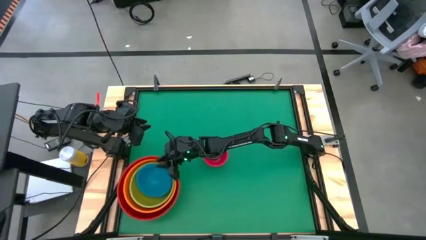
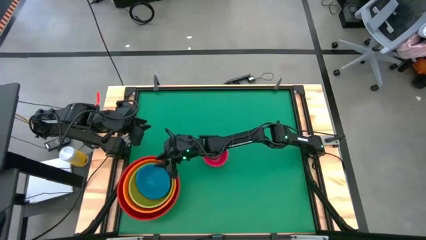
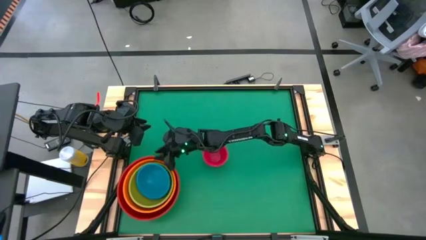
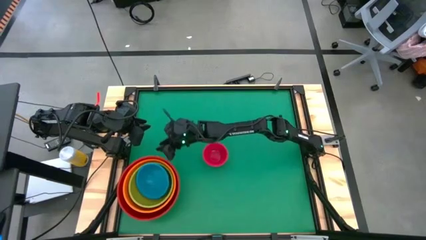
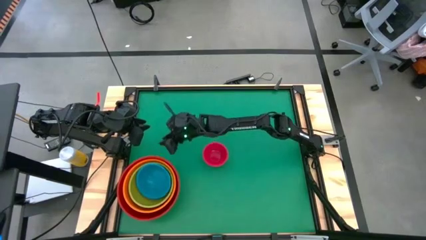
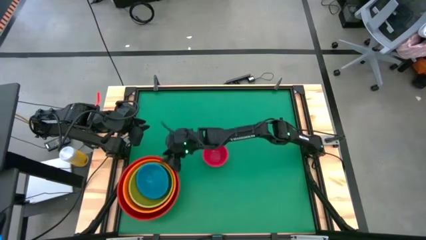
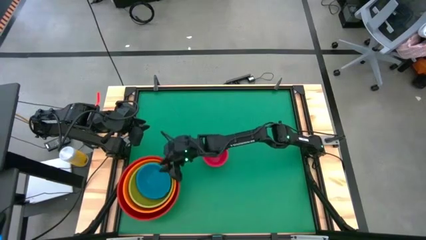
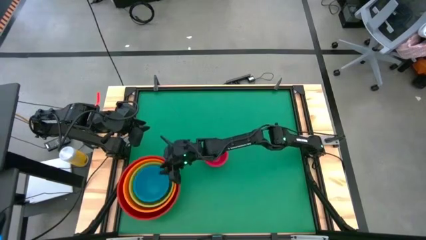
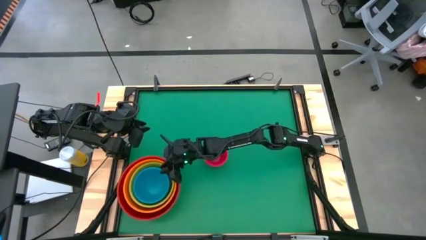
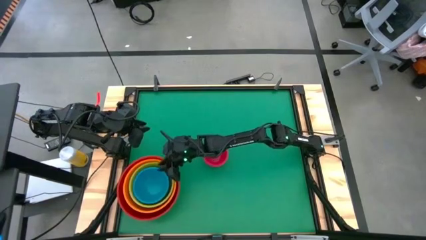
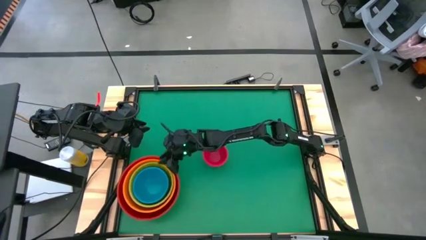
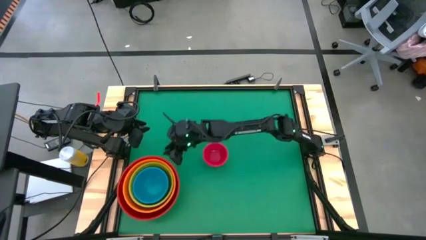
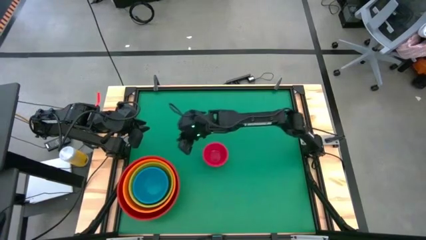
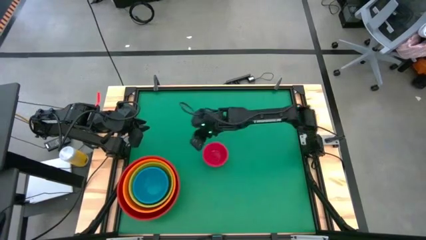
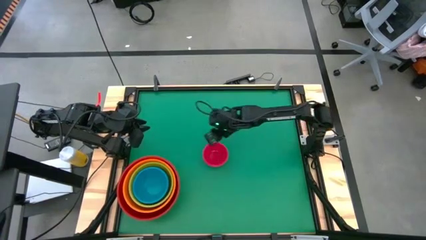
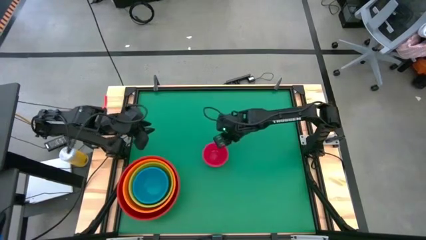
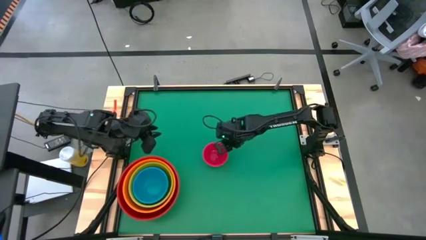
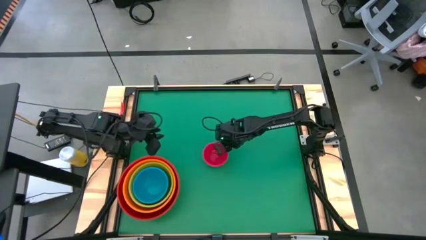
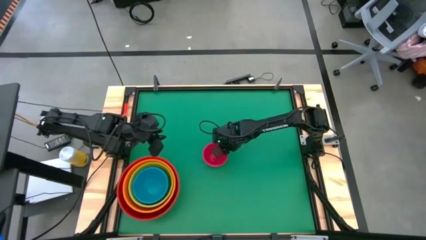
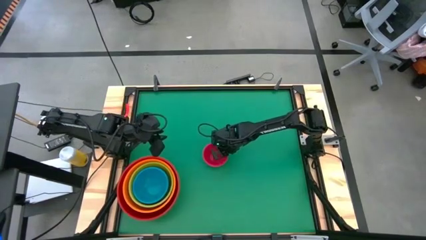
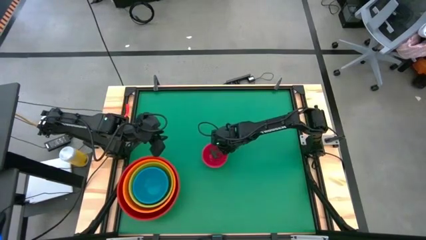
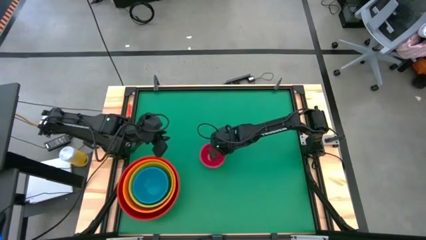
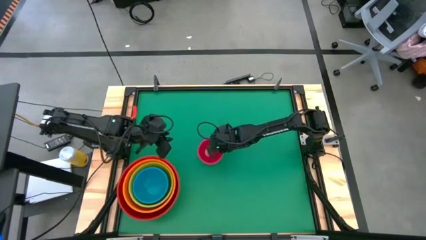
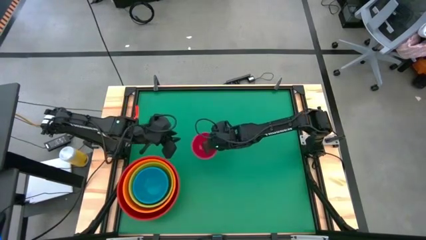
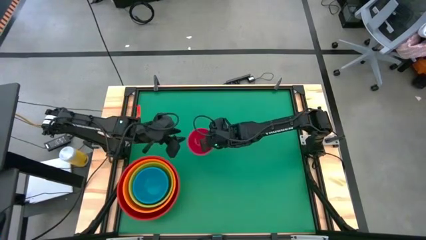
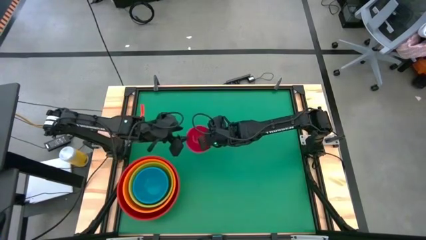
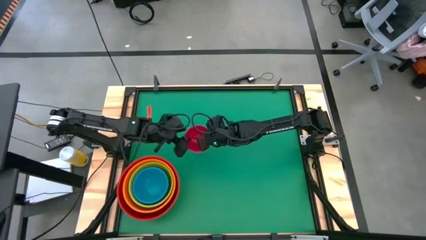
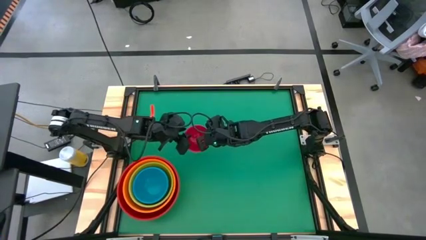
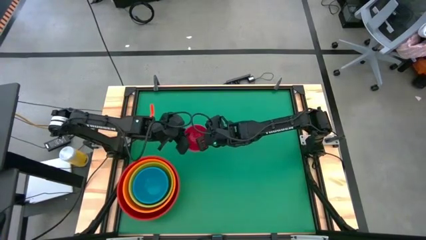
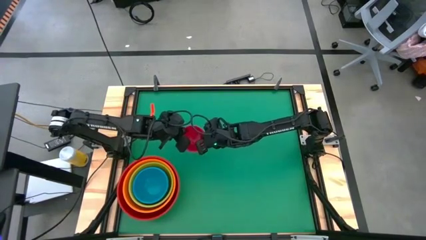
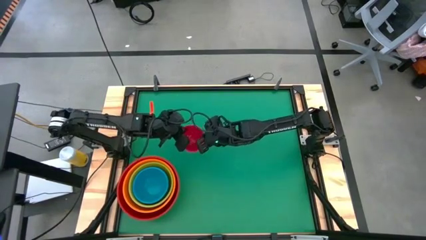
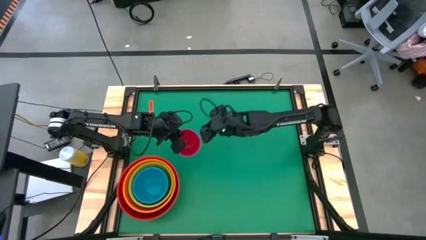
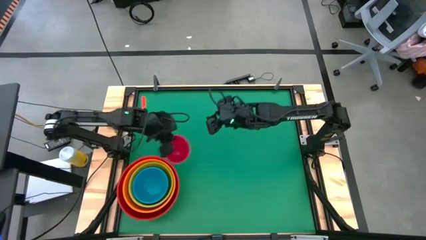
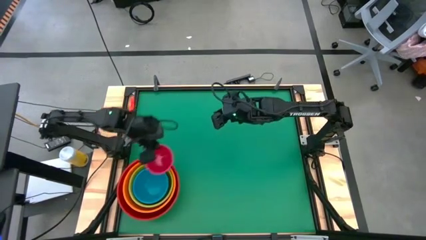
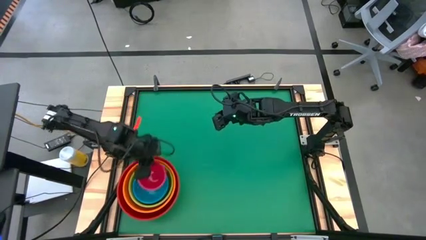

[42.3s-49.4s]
Stack the pink bowl into the top of the blue bowl

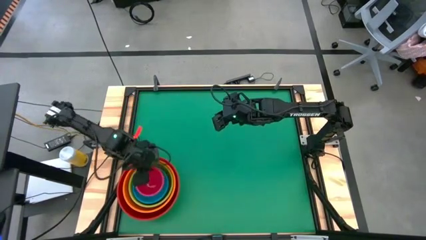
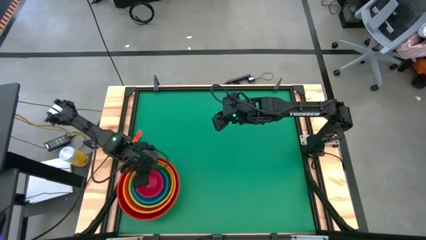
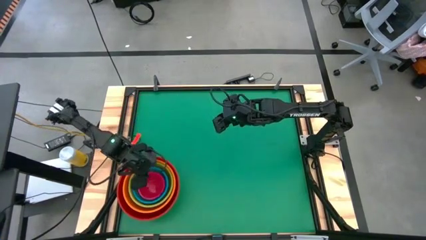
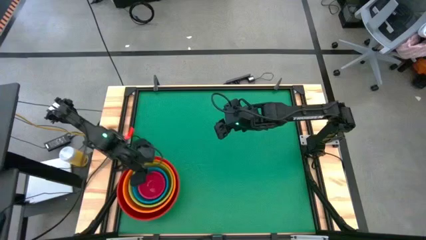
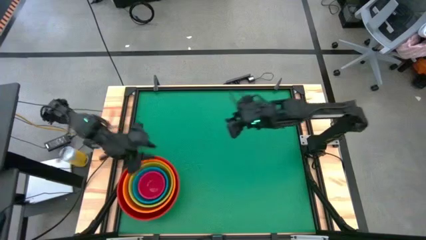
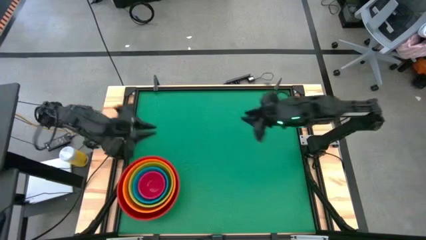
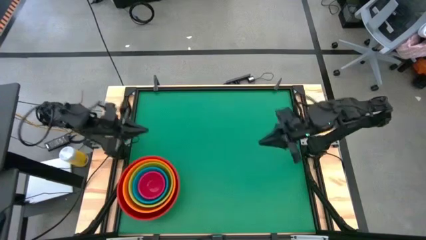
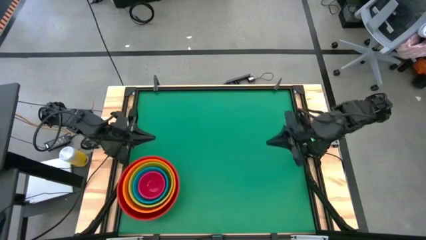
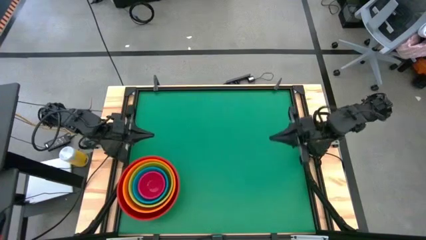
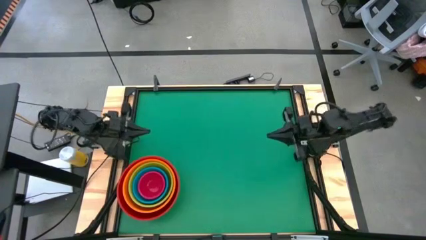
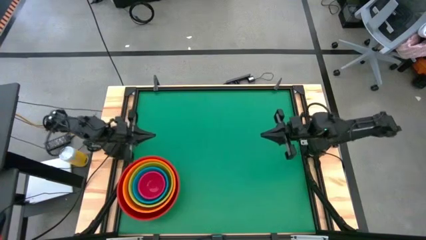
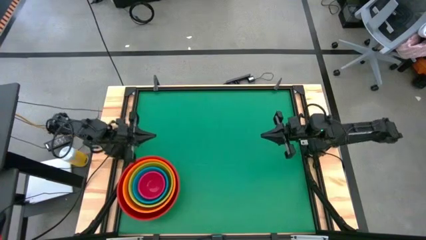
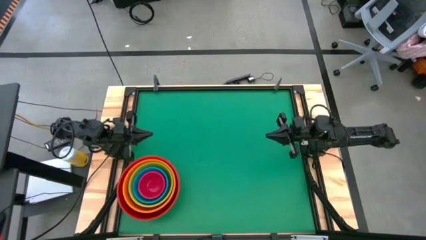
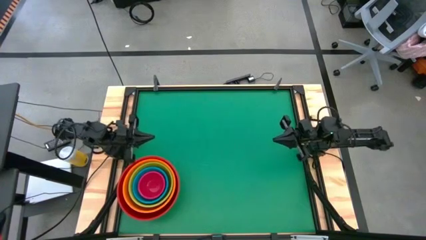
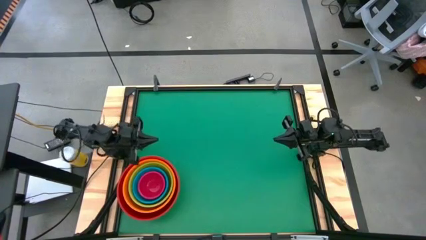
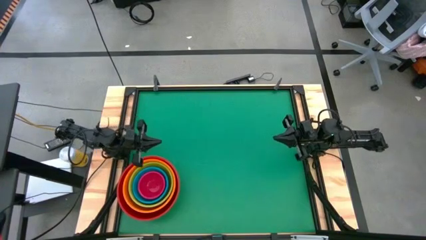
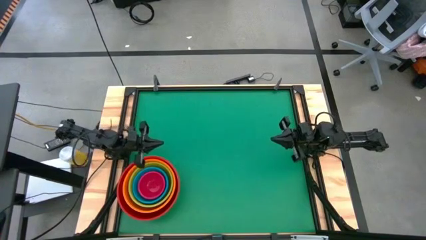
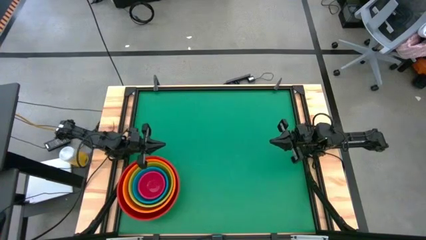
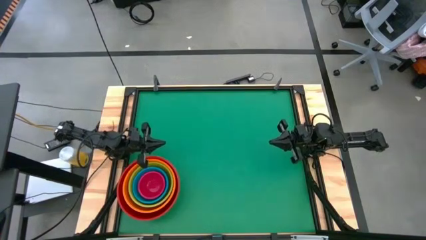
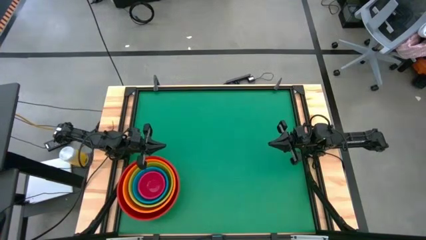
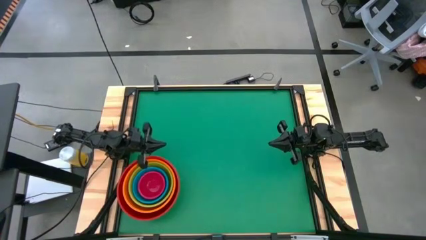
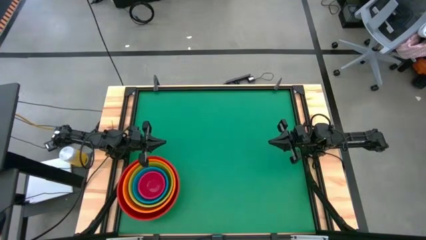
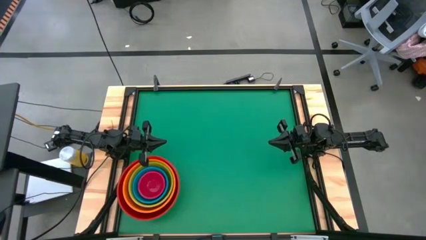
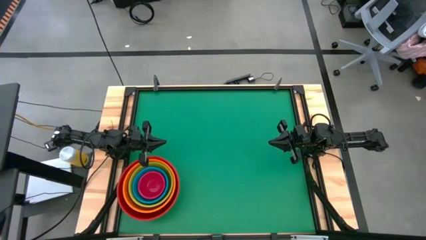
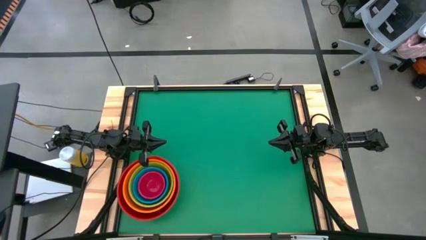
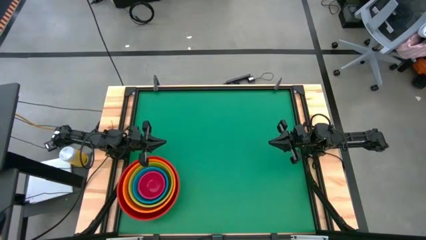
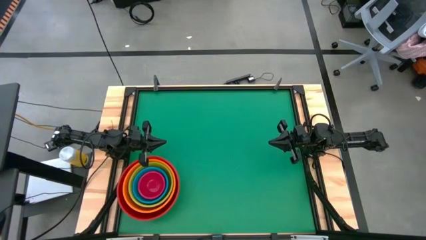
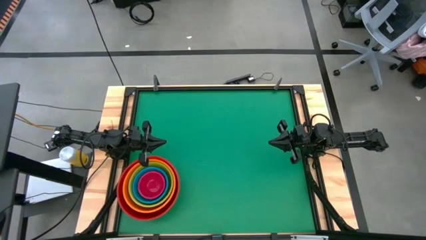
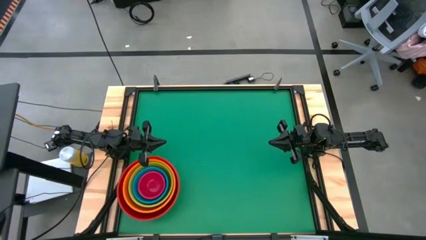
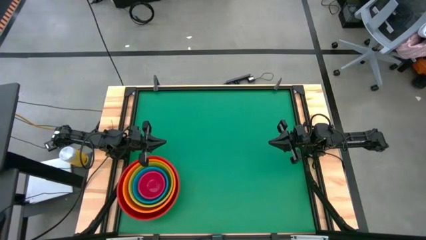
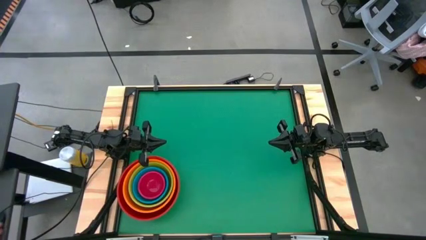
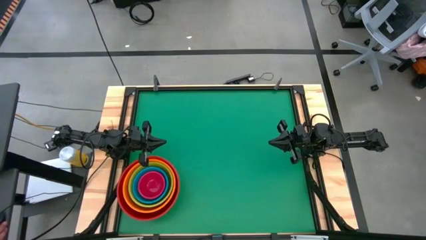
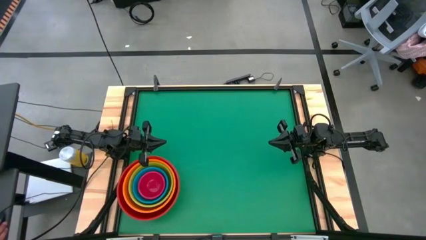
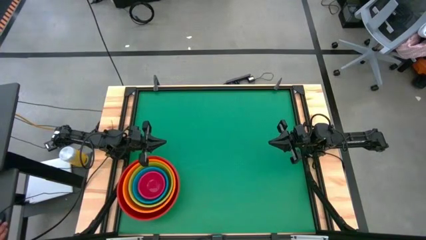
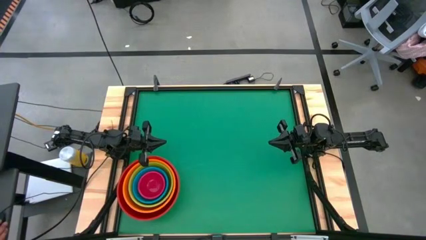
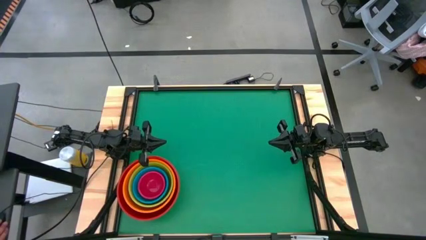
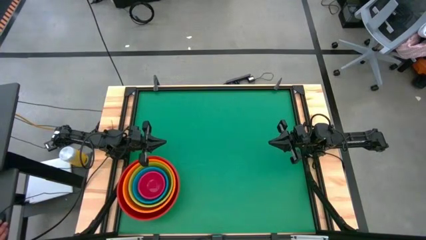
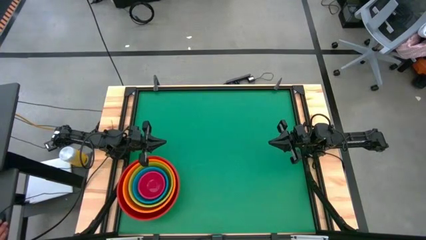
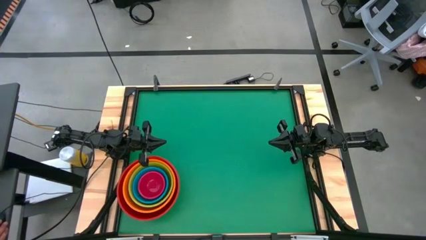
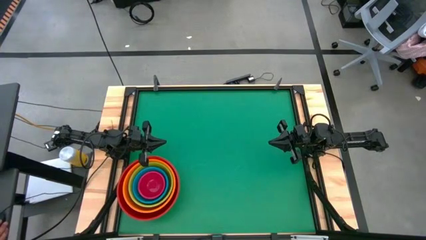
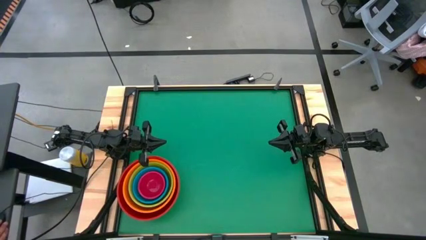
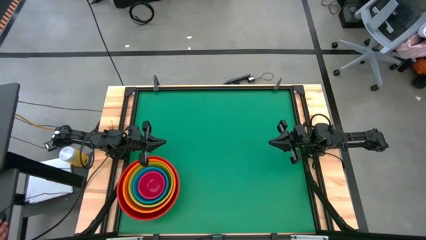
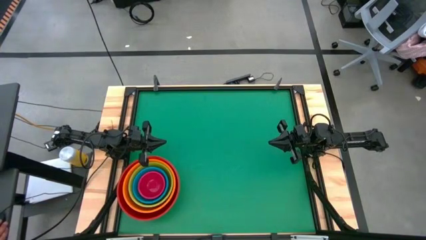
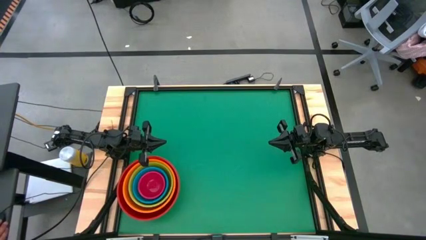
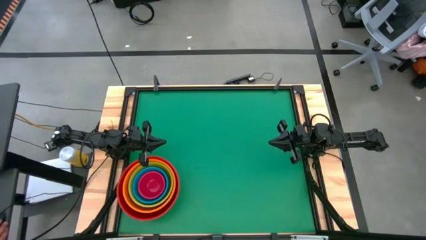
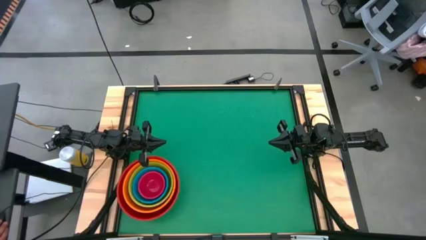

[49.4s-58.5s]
Return to Home Position
